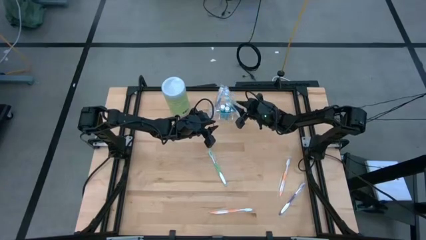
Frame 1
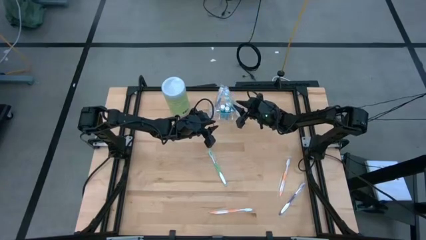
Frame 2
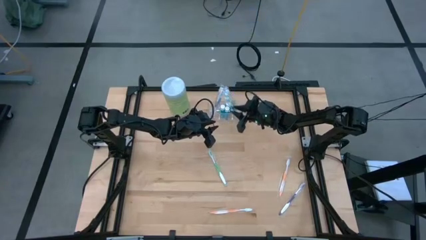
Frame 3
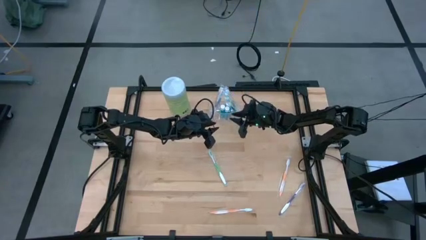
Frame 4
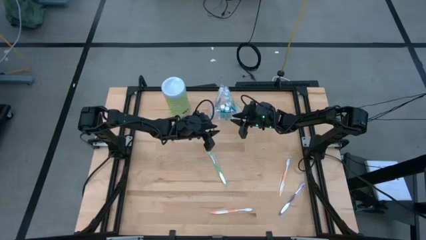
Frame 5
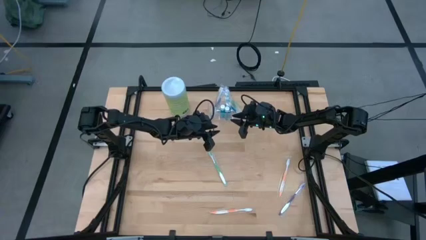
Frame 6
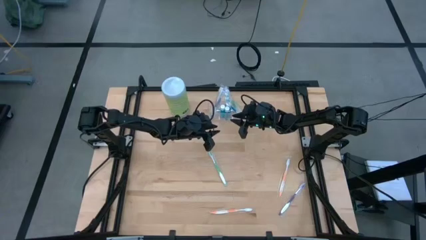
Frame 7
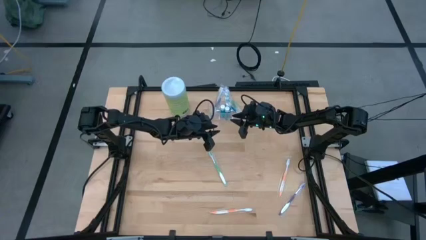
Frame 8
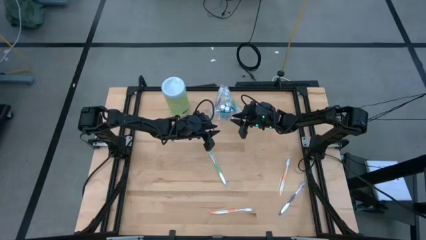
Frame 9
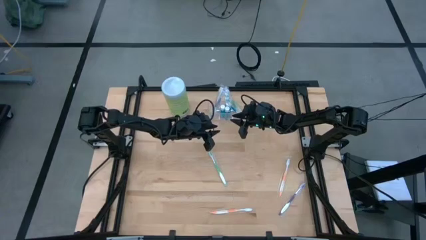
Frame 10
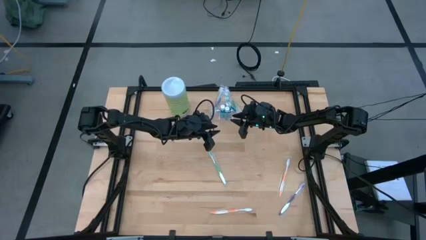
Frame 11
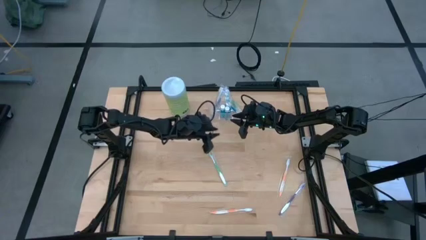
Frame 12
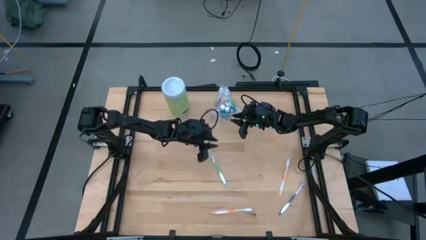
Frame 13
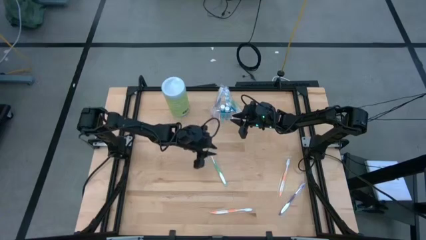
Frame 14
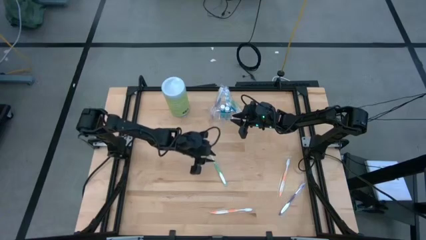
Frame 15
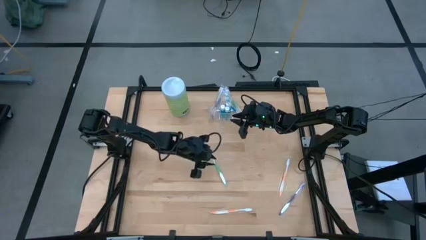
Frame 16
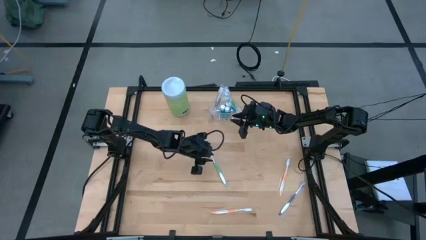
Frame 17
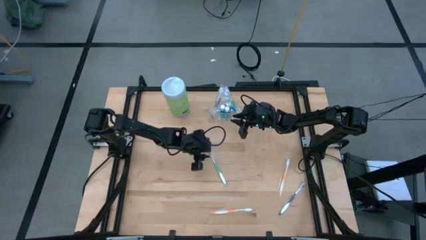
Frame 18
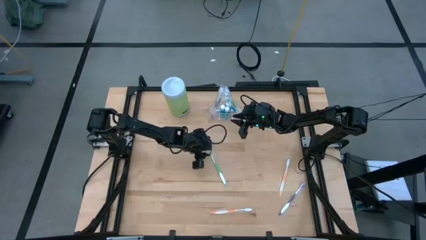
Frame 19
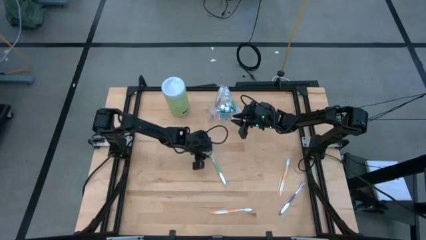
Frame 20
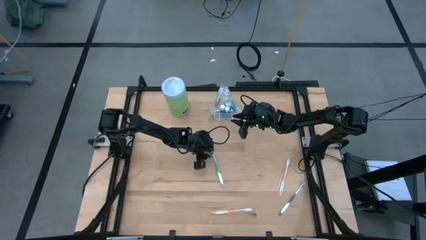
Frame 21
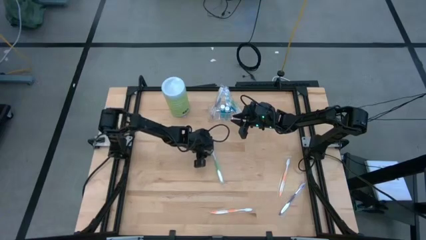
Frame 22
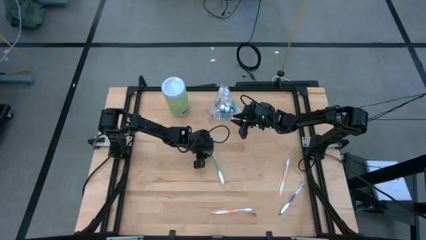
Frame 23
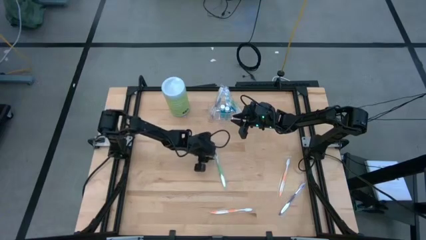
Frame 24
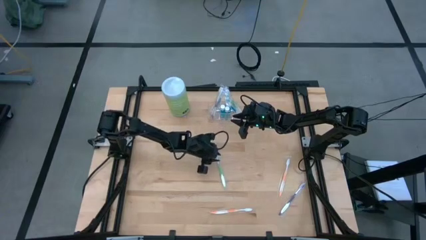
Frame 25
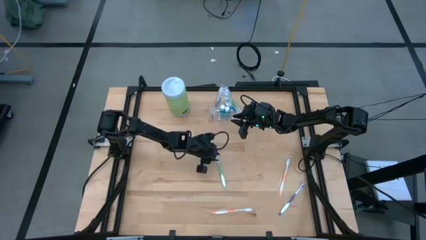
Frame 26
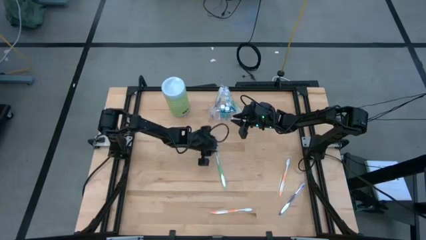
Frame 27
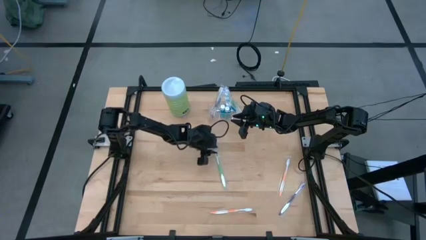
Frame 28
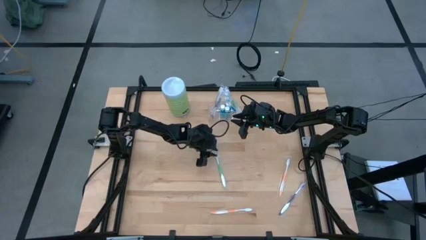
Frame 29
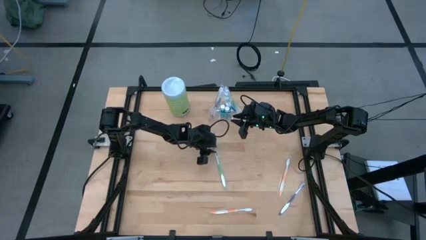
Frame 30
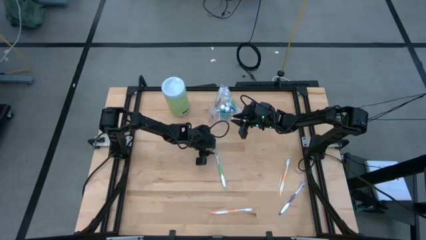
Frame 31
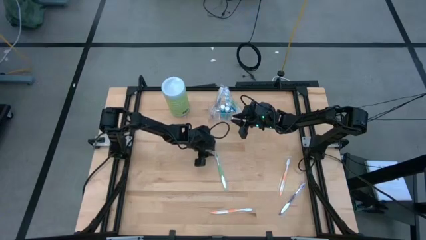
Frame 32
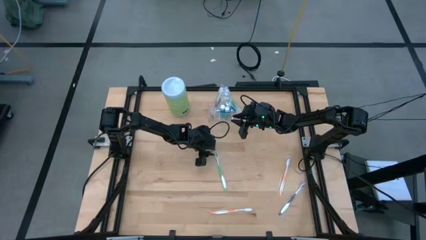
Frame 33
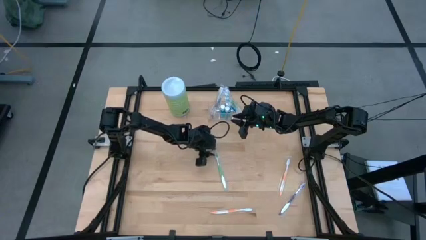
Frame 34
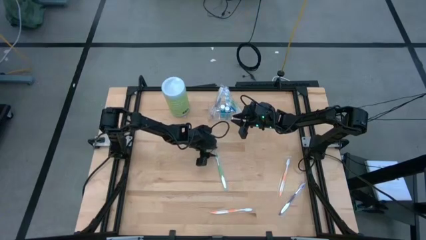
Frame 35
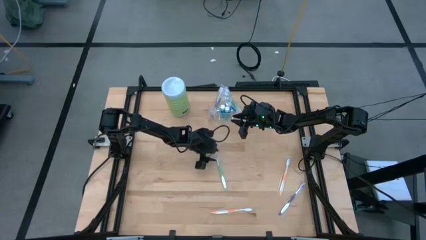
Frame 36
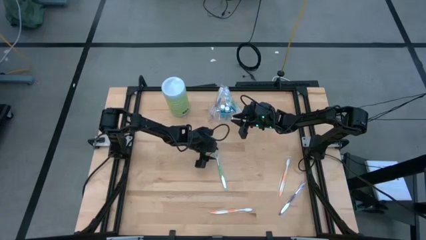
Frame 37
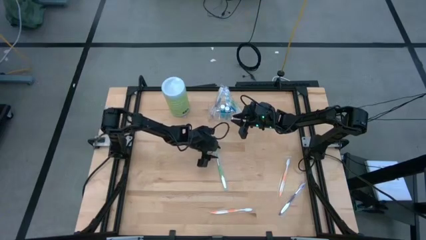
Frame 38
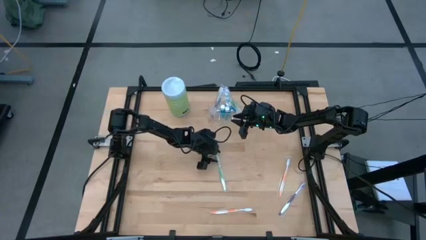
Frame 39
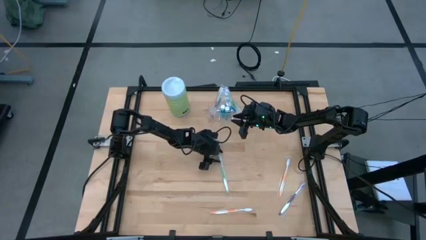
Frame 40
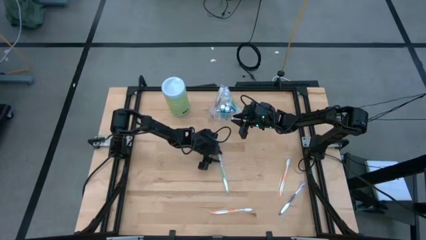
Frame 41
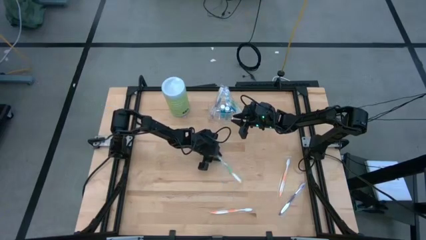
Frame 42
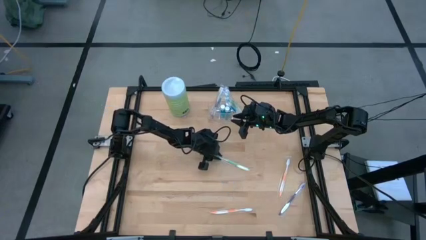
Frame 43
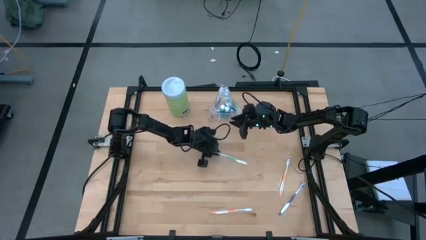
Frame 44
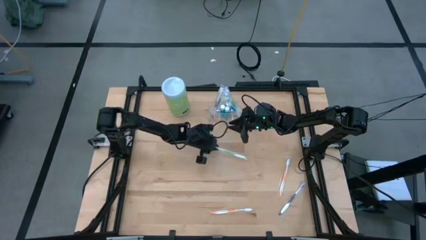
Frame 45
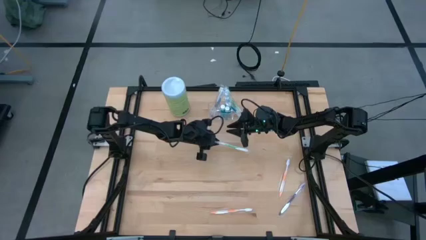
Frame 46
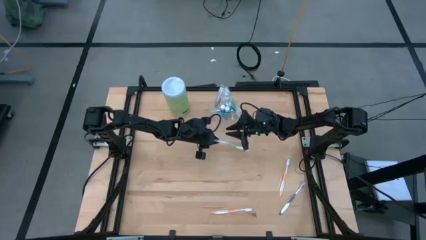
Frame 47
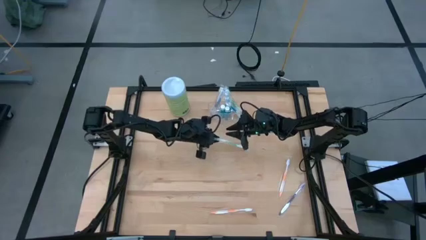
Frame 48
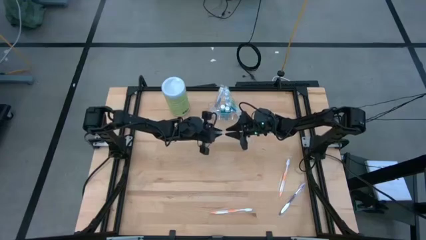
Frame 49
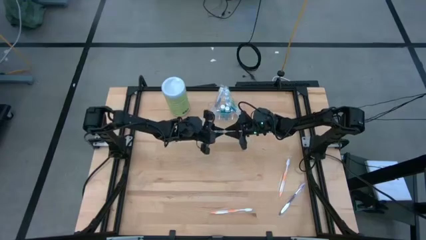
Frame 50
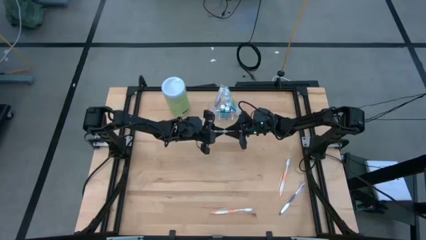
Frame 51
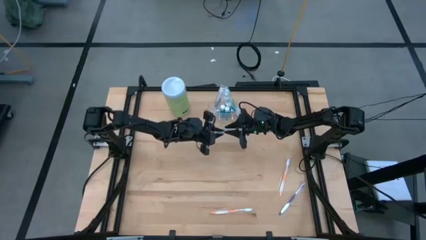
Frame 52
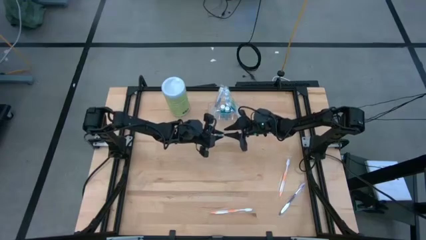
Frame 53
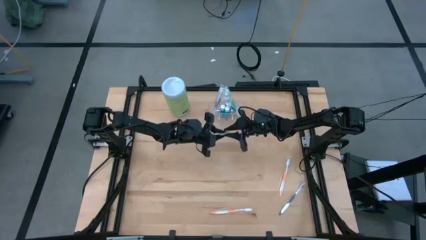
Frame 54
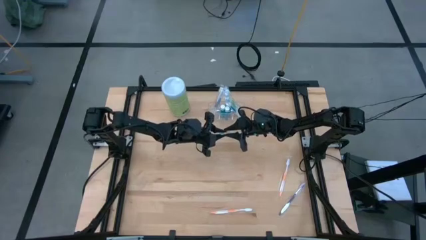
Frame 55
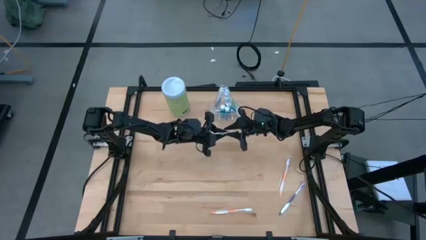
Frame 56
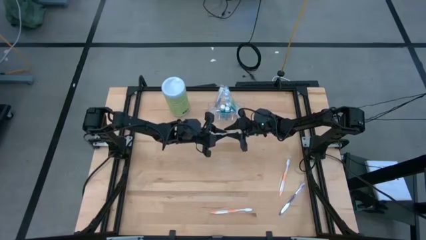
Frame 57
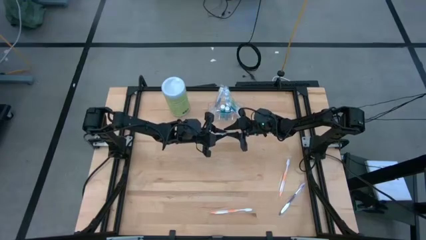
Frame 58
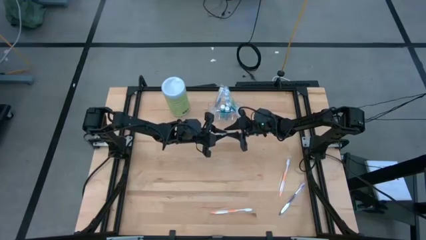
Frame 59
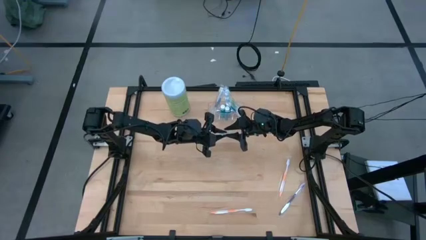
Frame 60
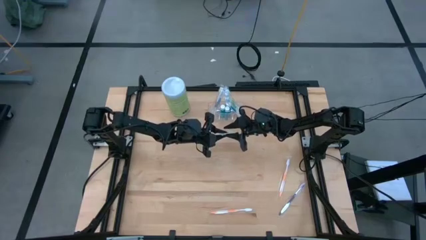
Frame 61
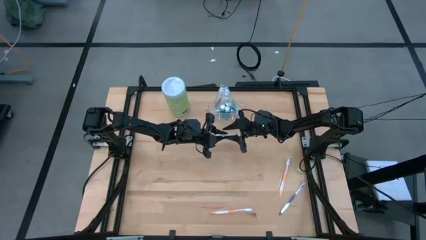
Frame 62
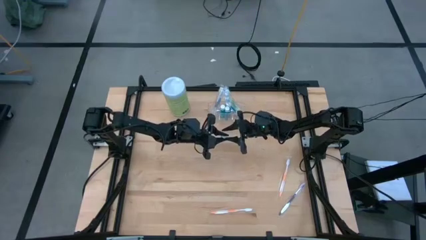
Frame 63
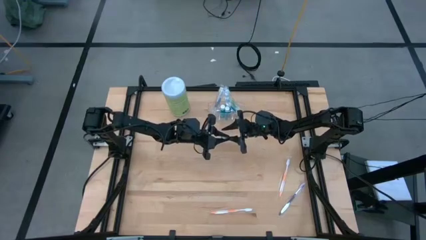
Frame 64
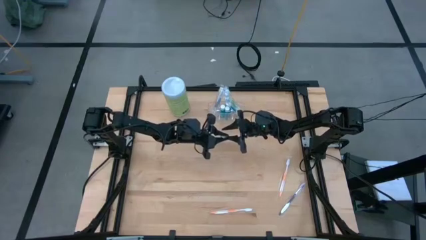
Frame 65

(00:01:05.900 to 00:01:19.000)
Task: Pick & Place toothbrushing station
Put the green toothbrush into the transparent organizer
